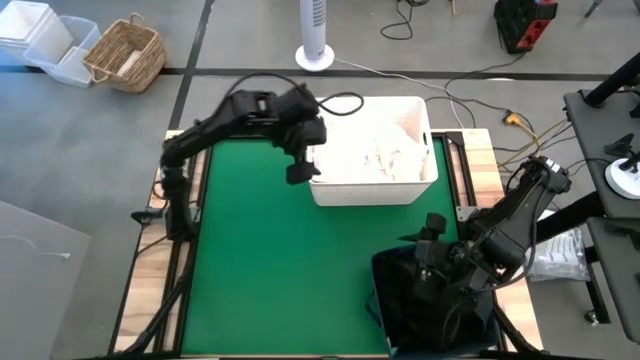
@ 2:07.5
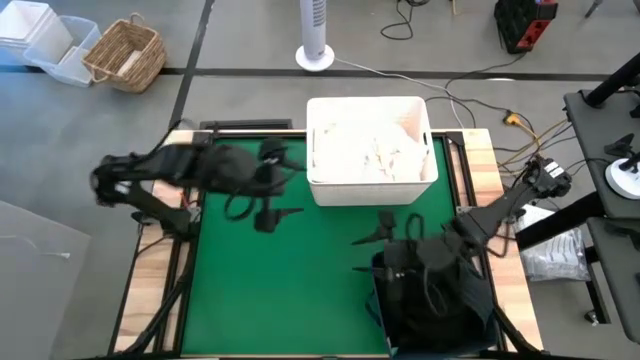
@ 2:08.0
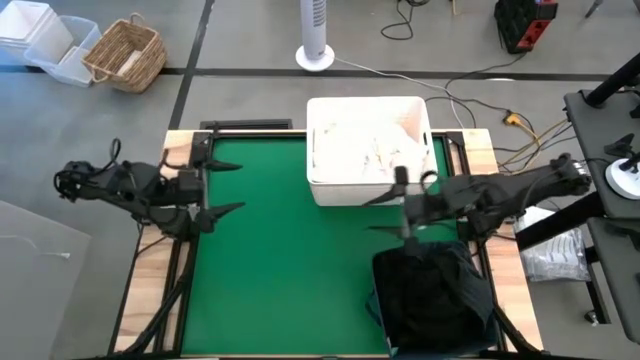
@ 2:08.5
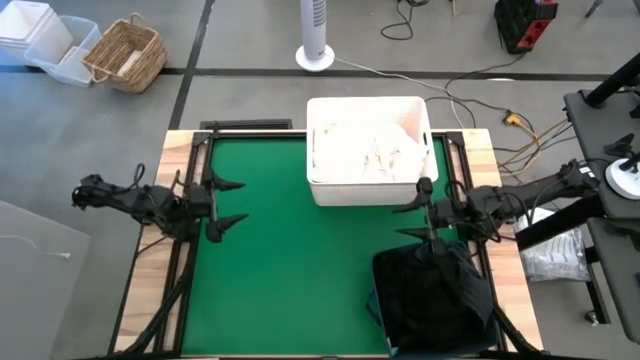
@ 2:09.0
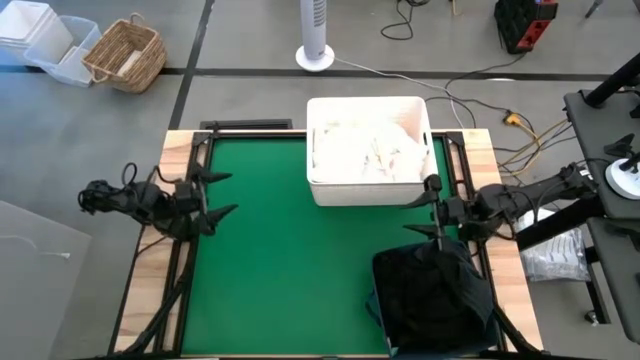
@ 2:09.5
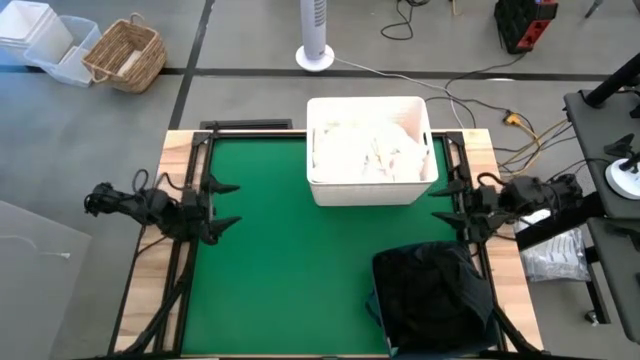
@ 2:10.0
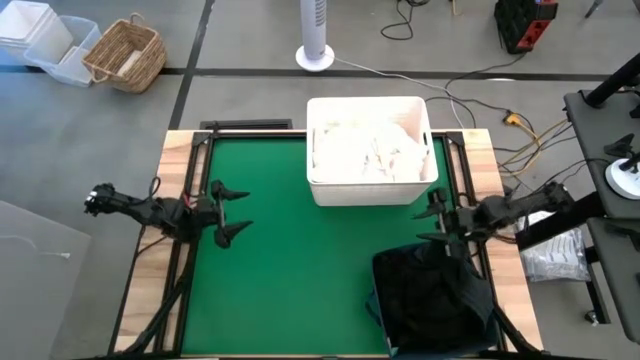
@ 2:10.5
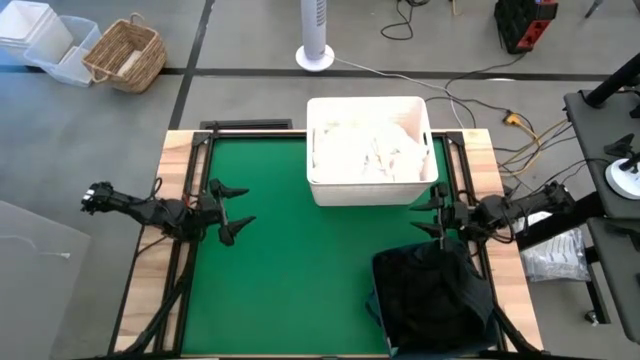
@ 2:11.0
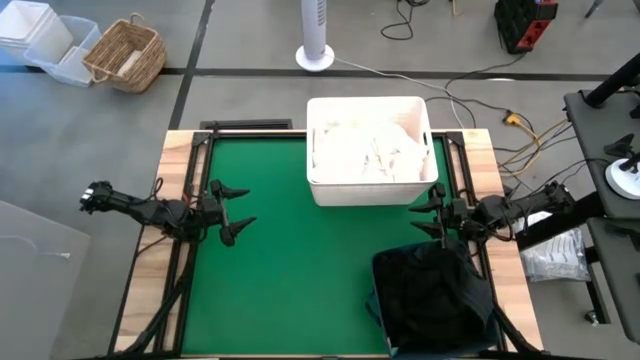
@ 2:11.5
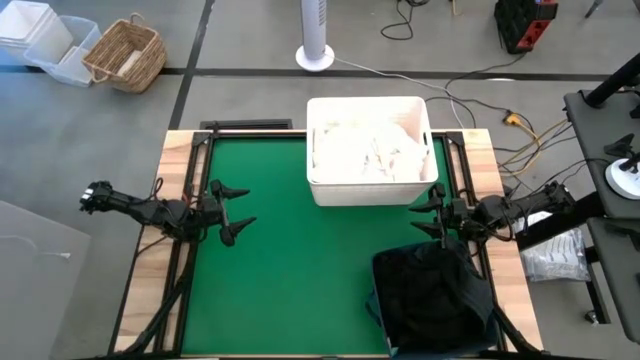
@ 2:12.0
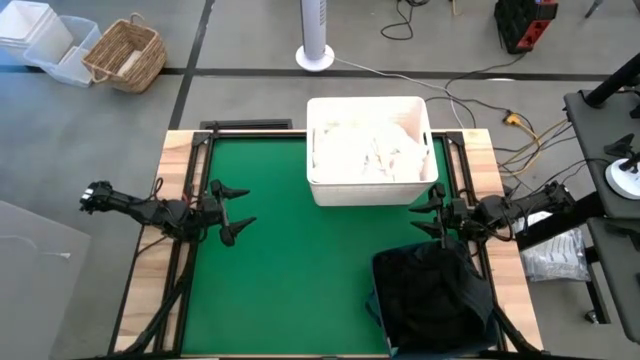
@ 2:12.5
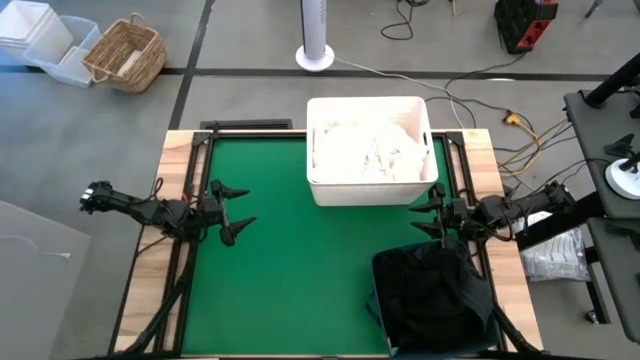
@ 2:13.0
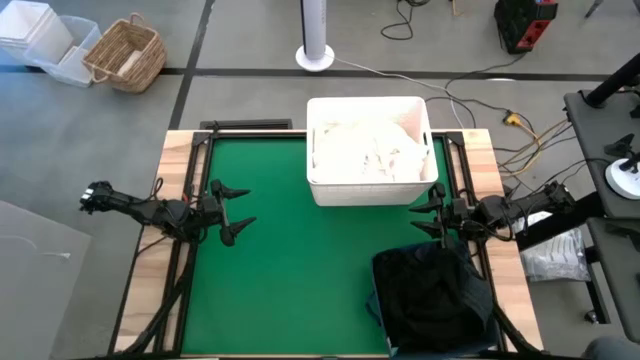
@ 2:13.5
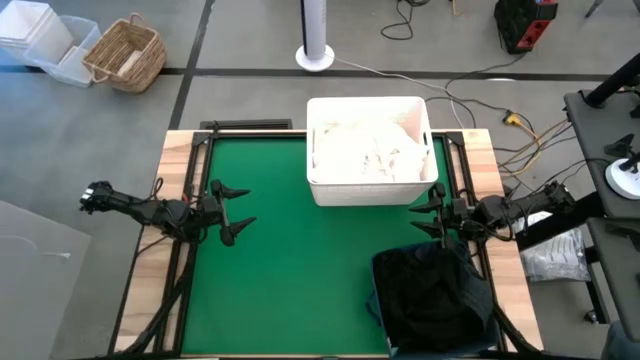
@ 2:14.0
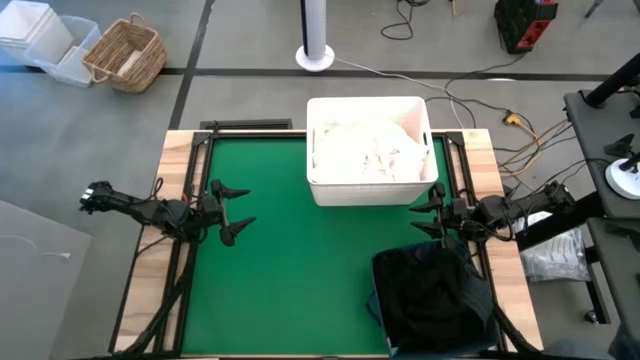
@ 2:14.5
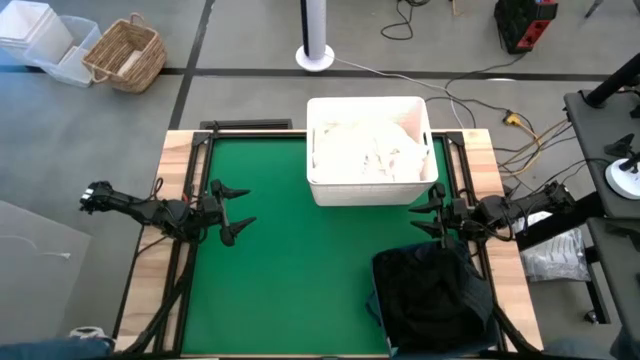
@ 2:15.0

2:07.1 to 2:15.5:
Return to Home Position
